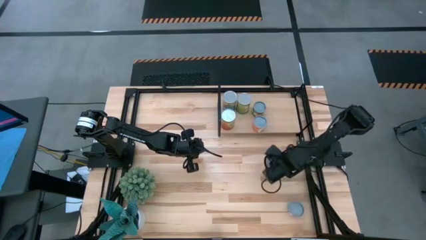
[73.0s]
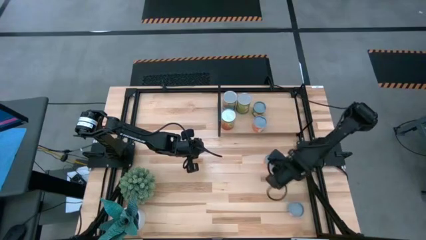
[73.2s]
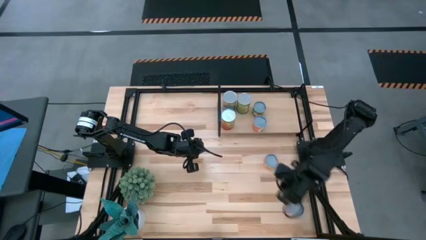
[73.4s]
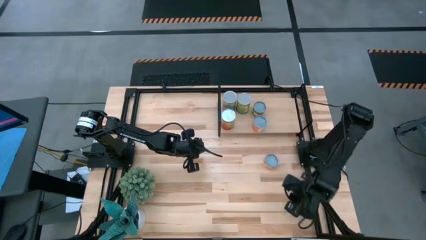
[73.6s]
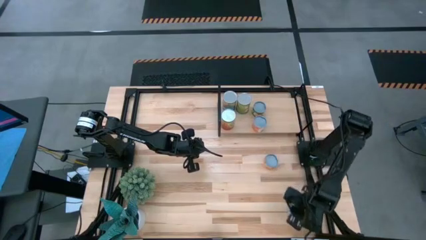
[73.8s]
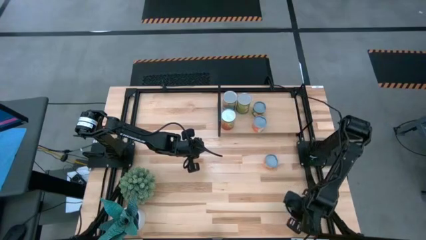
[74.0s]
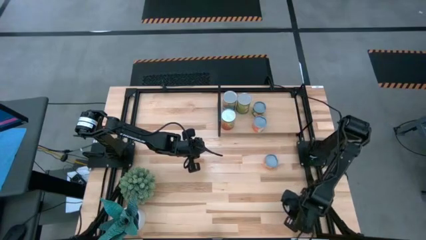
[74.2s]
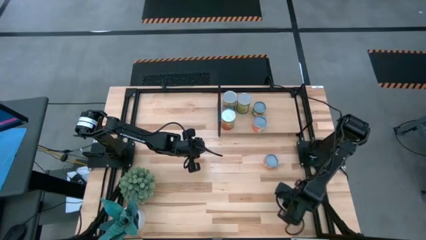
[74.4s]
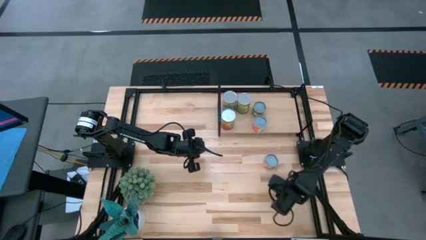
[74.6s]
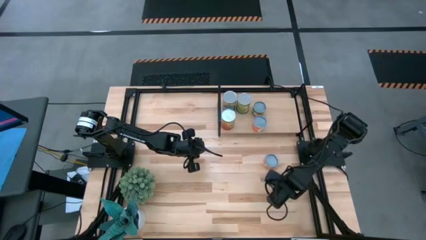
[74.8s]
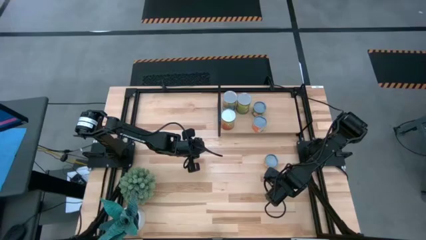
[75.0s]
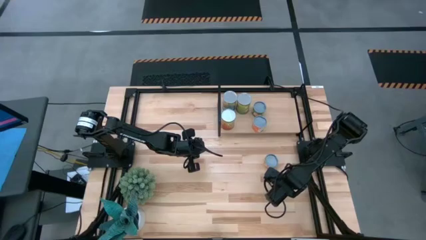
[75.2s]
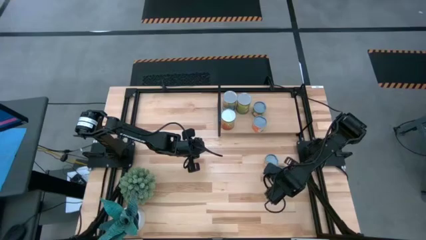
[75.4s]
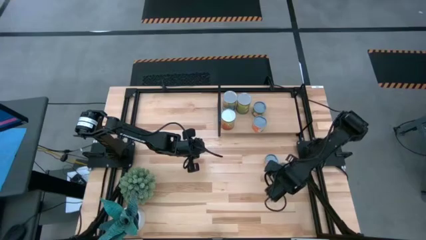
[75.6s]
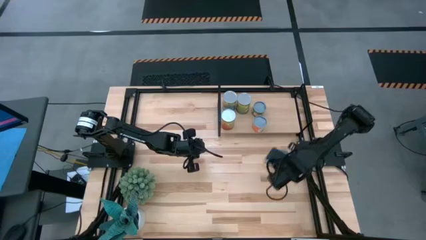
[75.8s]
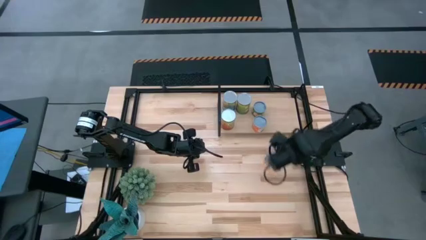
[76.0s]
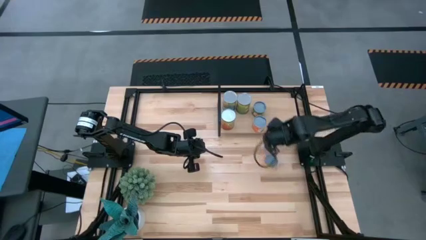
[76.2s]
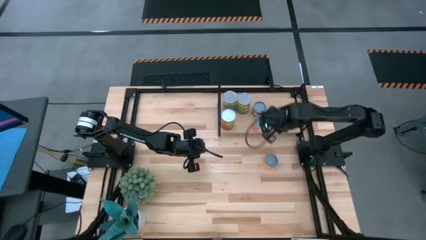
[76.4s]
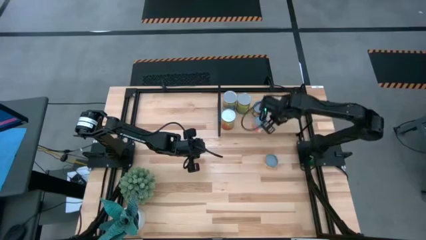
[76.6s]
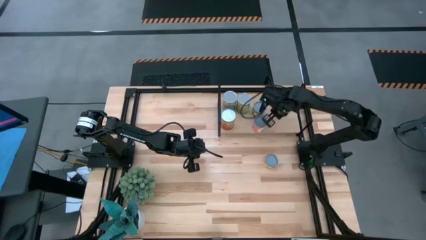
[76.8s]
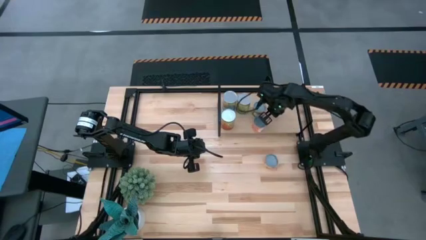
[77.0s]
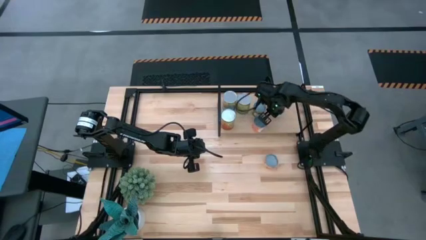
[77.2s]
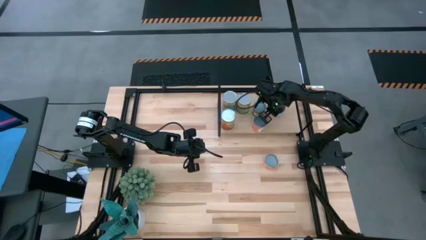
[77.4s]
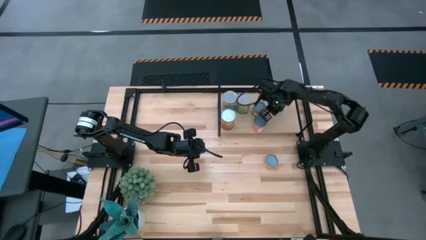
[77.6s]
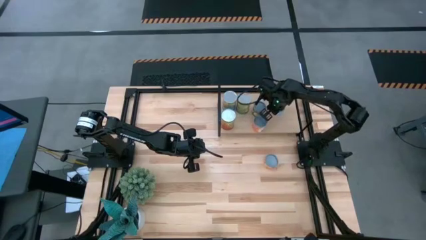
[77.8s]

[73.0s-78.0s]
Task: Pick and place cans onto a shelf
Put the canned salmon on the shelf

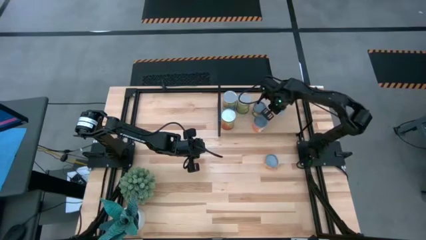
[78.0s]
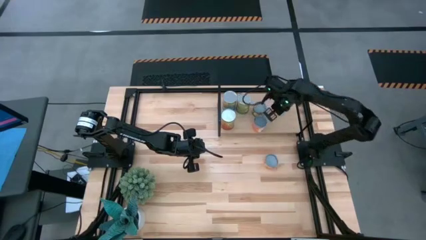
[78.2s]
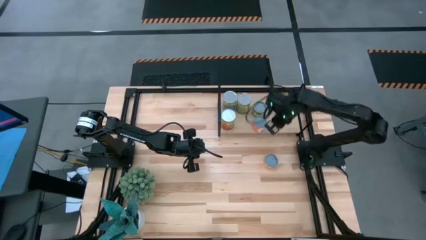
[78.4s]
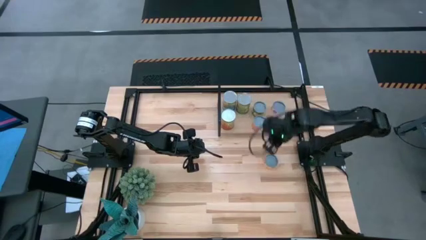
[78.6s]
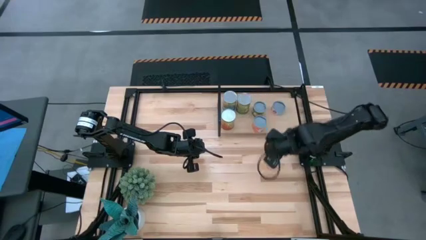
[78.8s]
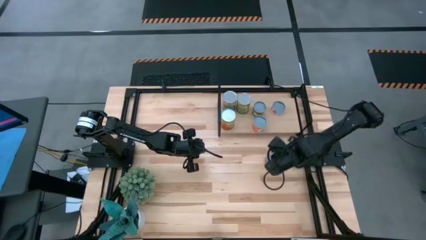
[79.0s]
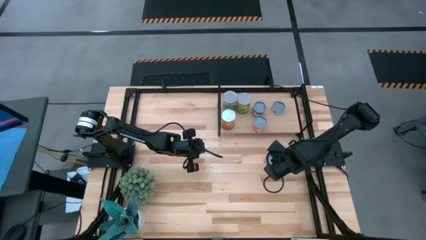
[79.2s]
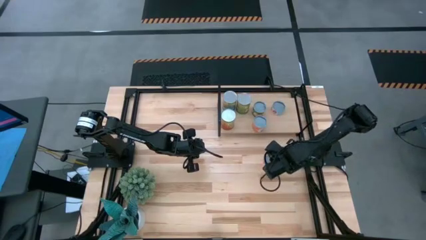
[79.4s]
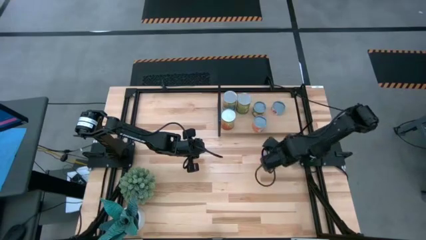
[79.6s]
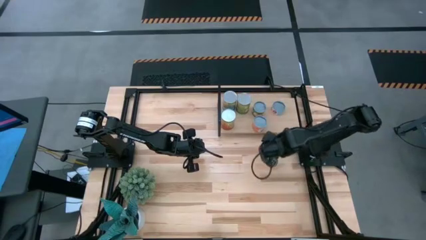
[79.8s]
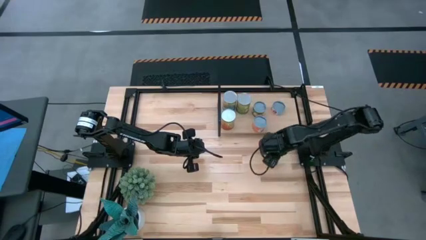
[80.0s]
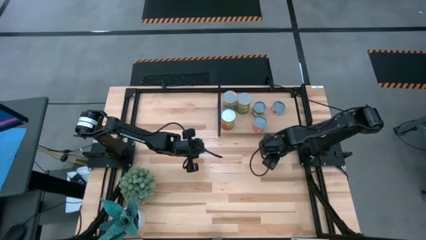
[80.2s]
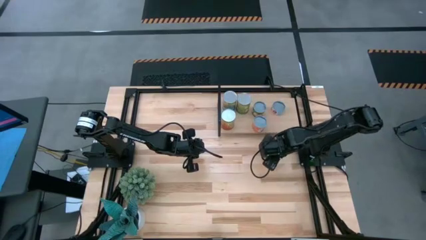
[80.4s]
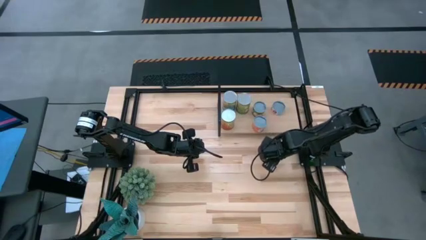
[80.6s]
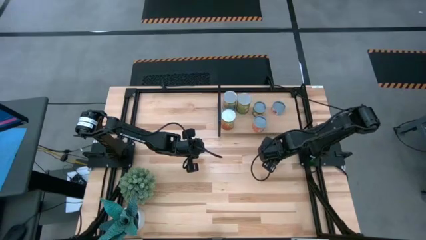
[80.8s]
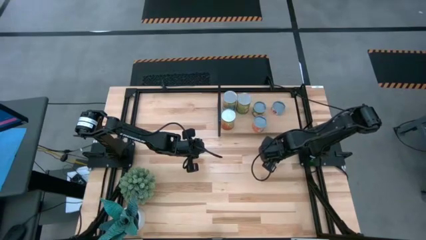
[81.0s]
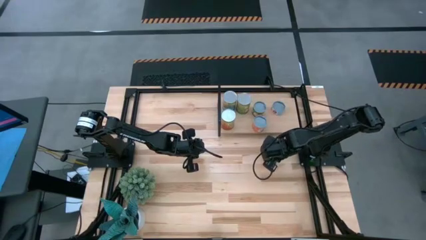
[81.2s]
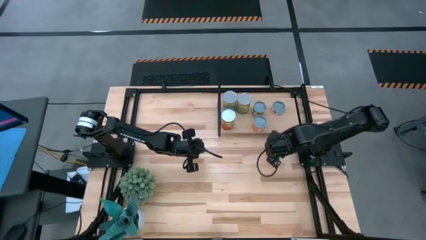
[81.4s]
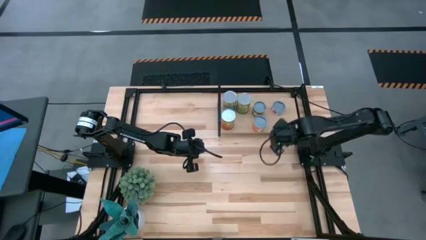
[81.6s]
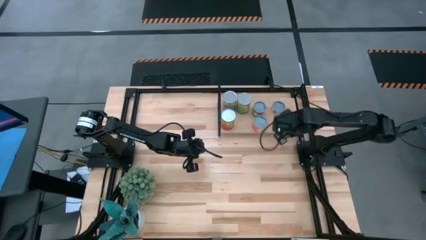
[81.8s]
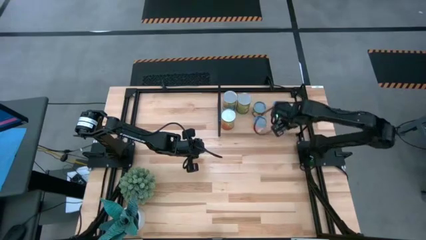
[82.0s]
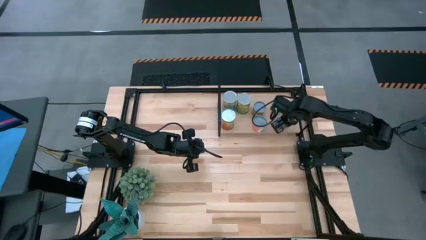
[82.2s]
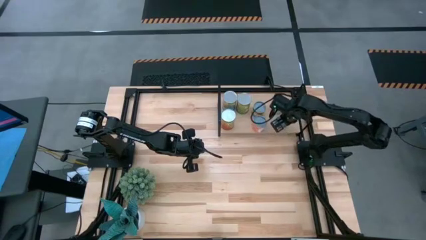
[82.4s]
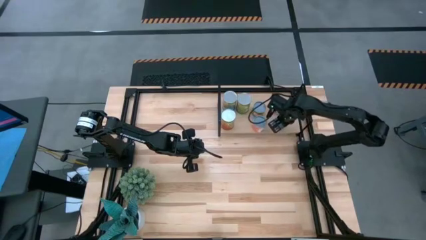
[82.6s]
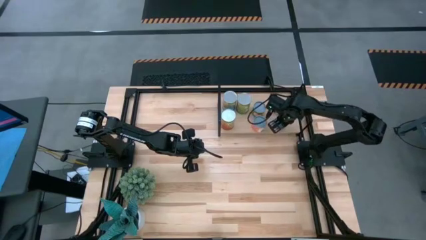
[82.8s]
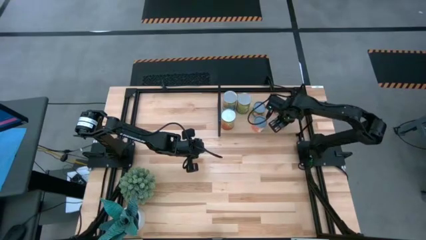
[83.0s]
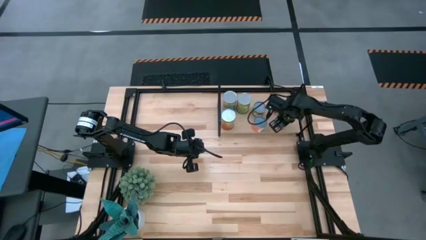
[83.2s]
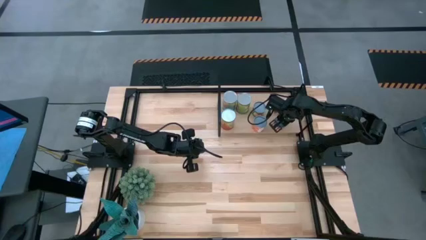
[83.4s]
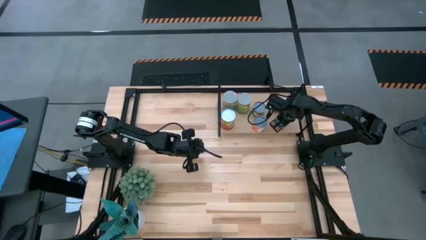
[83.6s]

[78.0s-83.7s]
Put the canned pineapple rings on the shelf

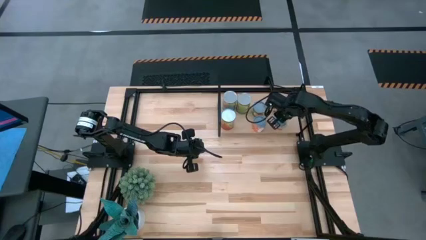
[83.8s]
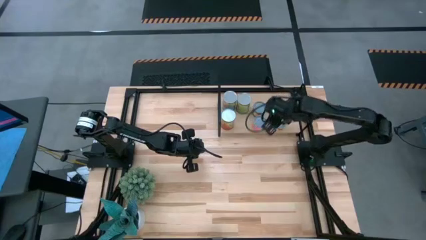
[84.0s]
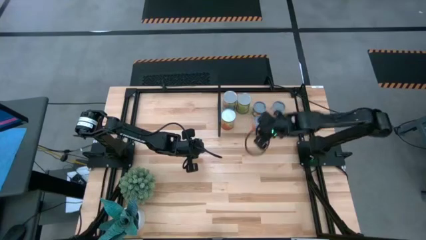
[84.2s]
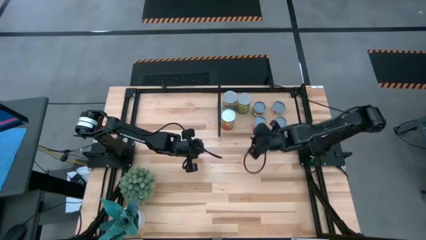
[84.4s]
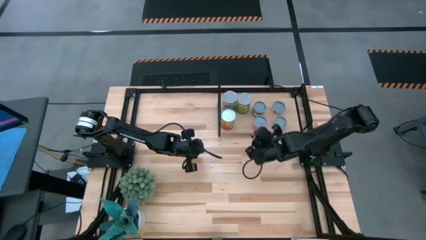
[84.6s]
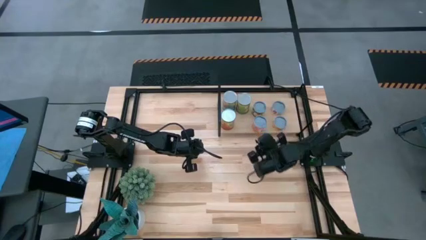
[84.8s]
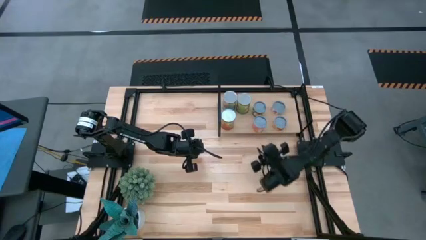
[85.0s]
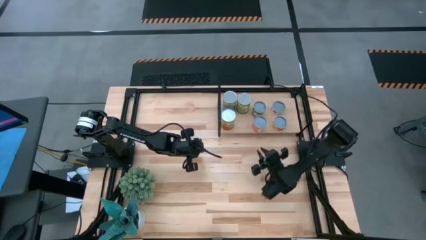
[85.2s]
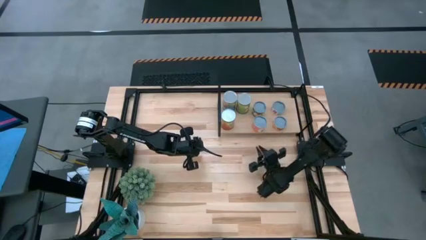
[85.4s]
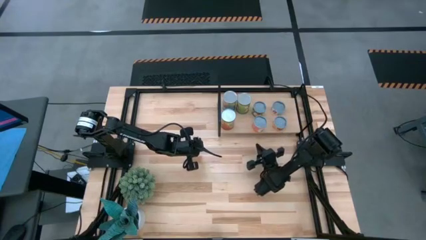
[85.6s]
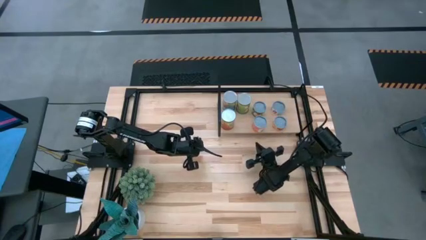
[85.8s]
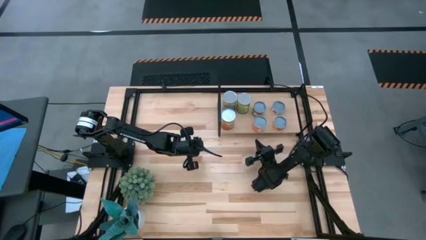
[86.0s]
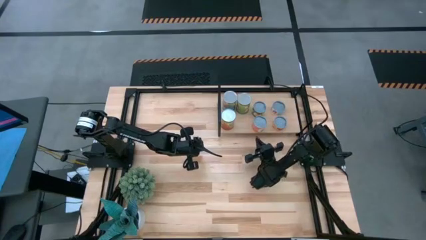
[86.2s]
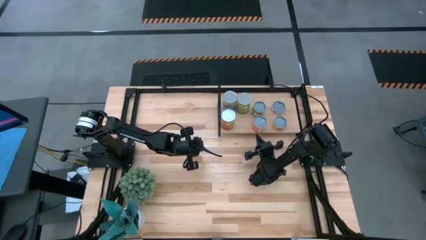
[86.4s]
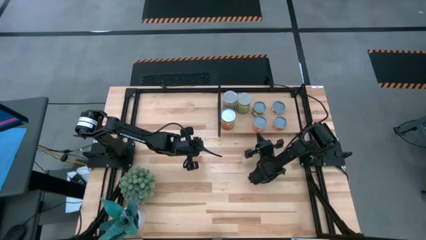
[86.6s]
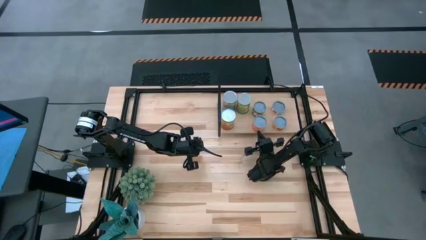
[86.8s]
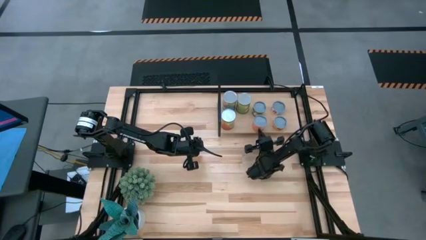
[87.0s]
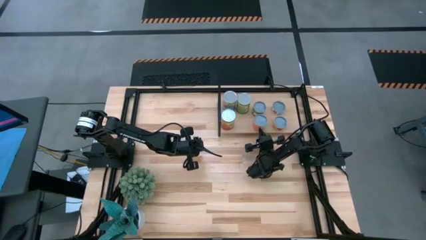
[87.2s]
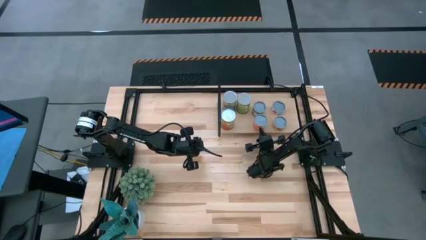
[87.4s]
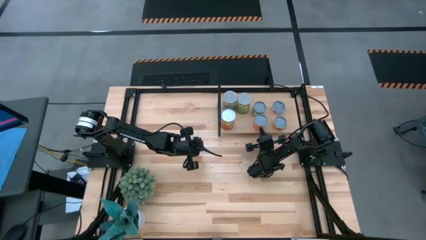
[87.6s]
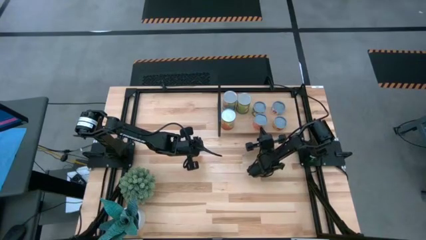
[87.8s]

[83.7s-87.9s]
Adjust the canned saucy meatballs on the shelf
